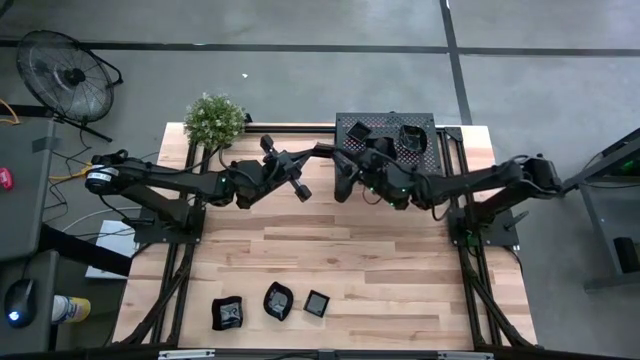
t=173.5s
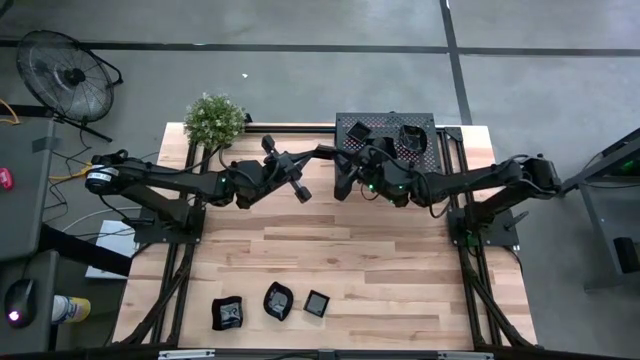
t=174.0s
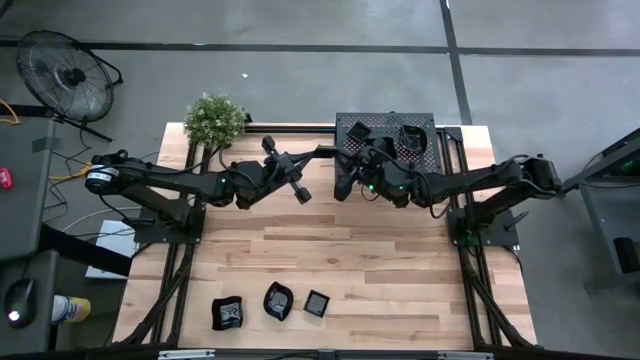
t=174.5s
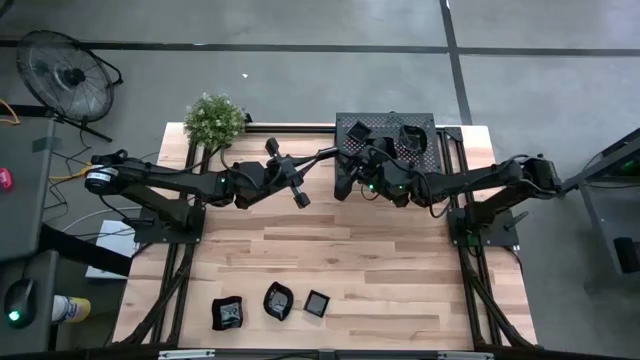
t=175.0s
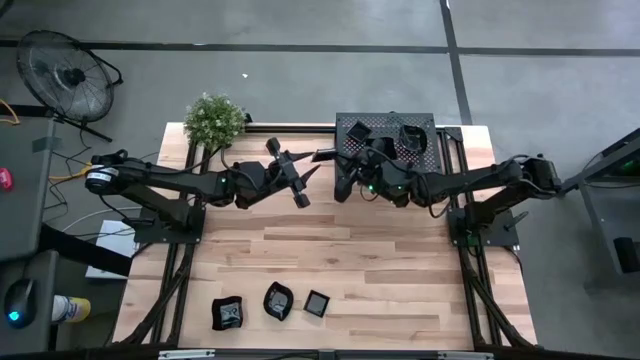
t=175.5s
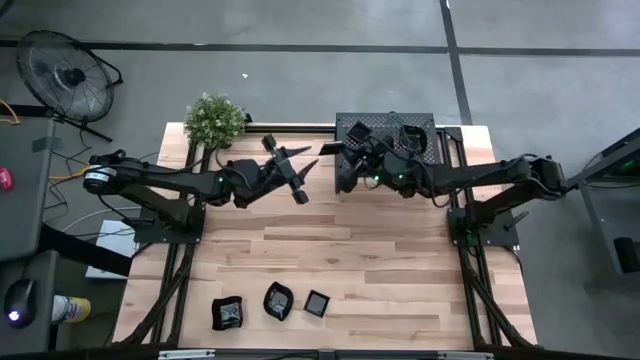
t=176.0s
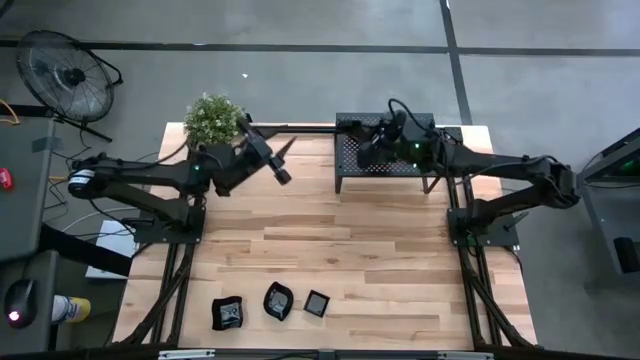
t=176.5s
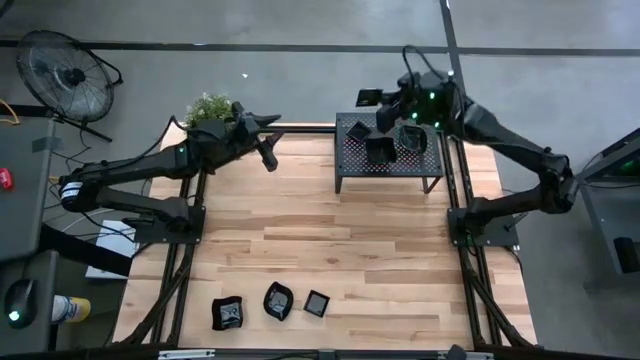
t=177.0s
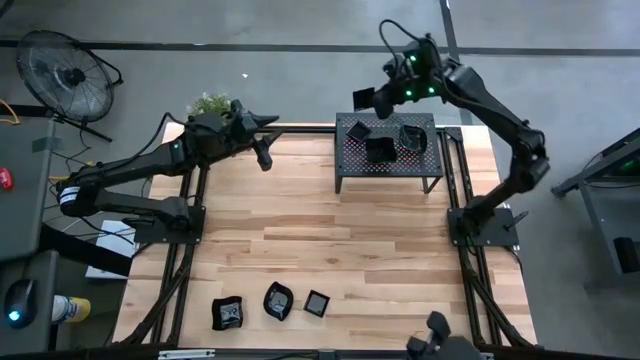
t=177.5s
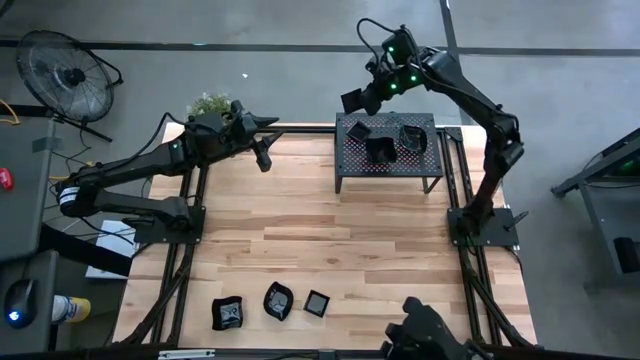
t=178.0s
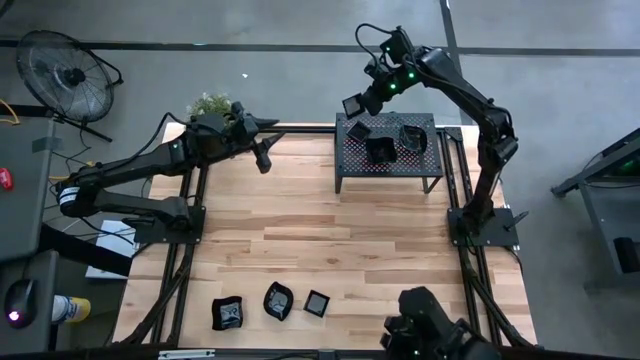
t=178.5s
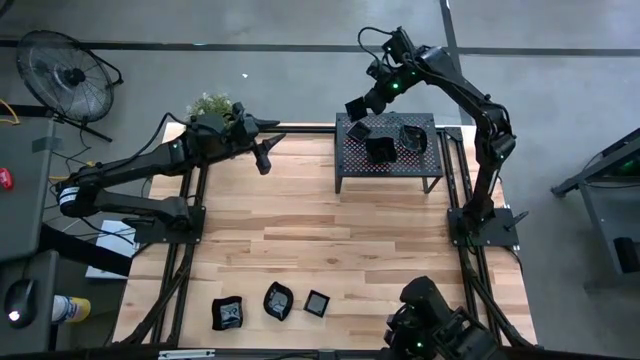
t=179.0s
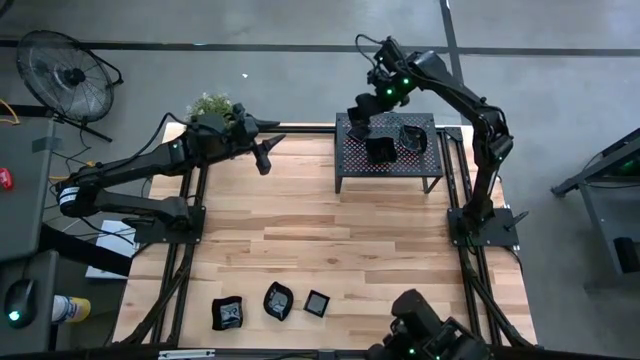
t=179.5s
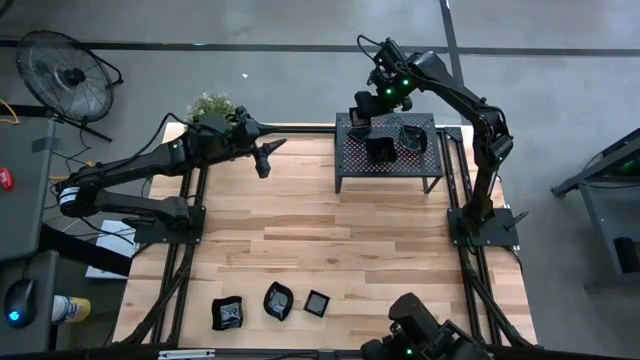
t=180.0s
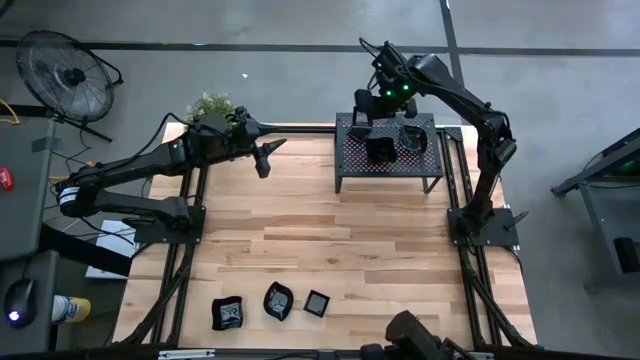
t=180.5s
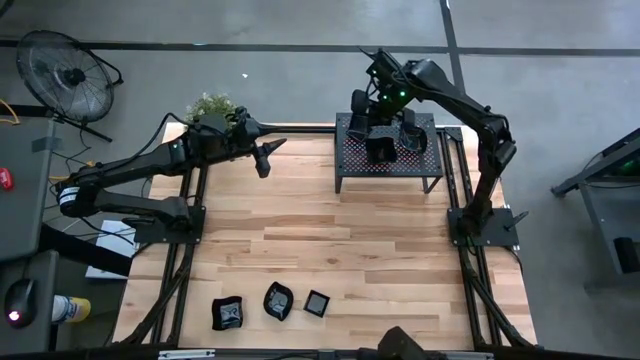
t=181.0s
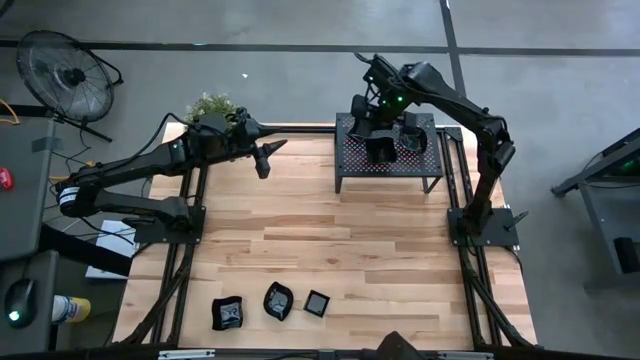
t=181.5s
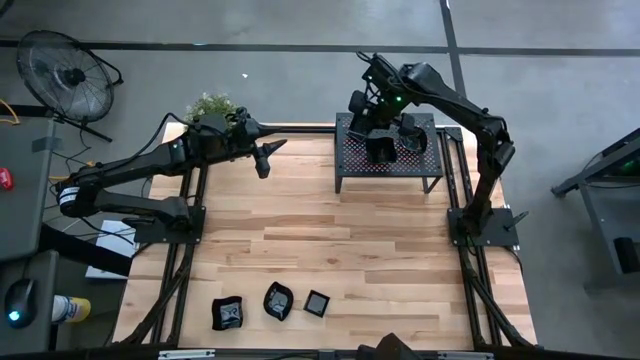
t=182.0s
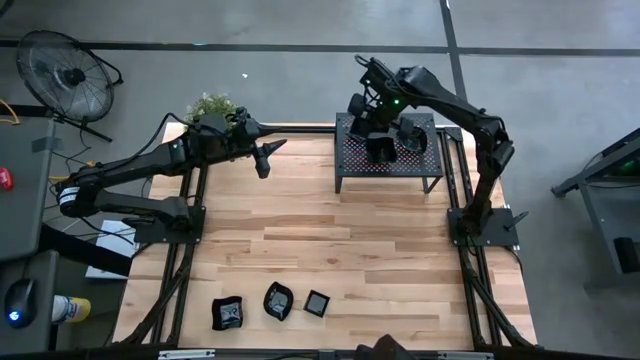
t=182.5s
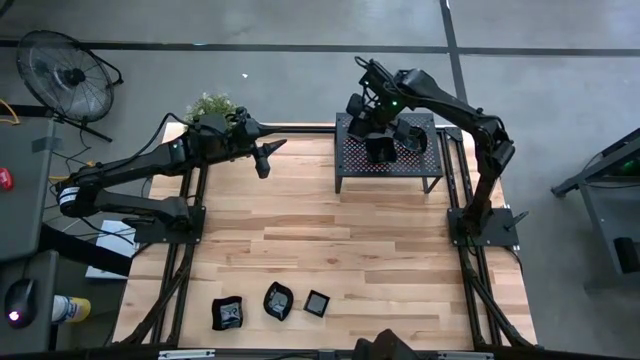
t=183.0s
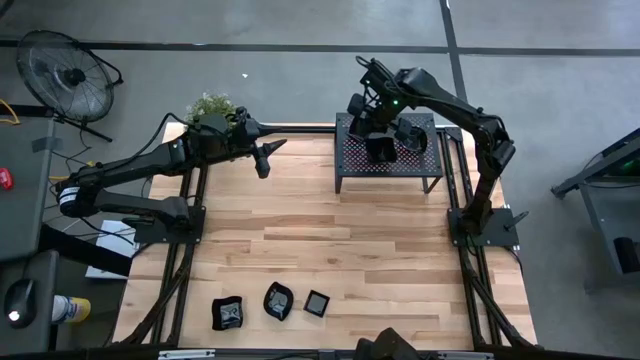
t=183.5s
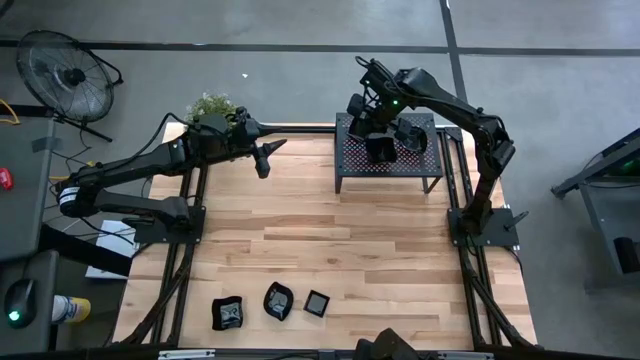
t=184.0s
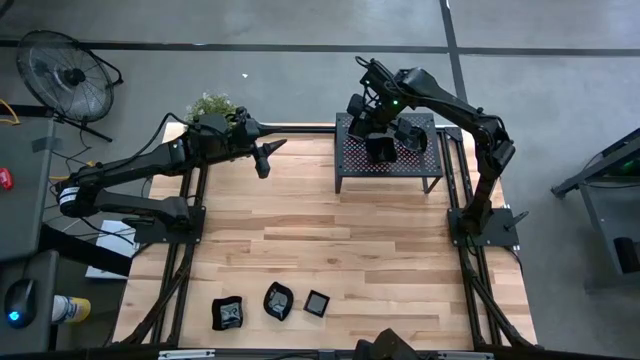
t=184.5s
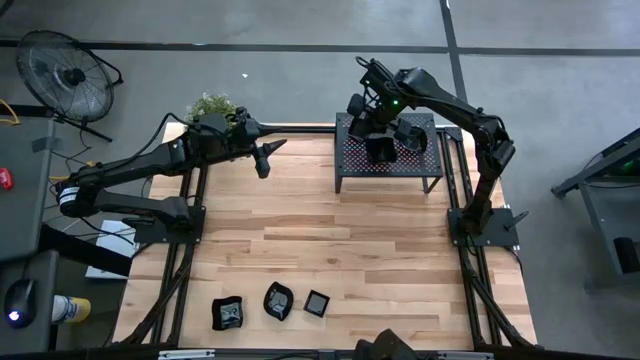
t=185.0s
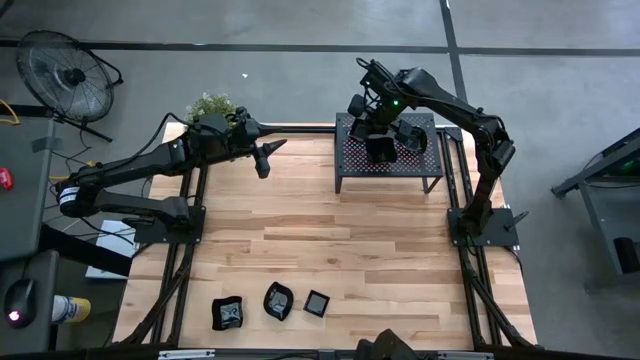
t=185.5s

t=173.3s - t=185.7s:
Task: Pick & Place Mini shaped plates
Stack the black square plate on top of the black square plates on the shelf
